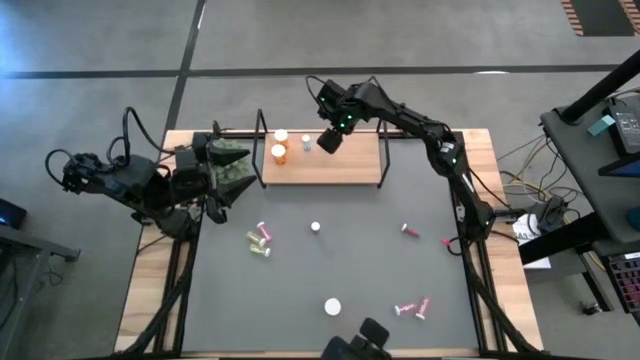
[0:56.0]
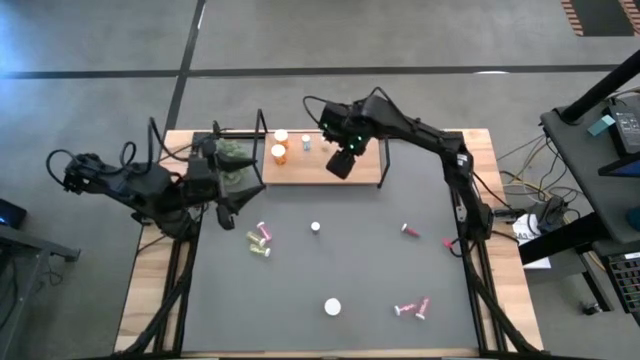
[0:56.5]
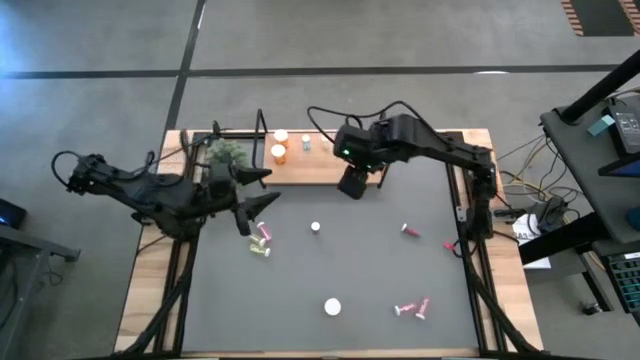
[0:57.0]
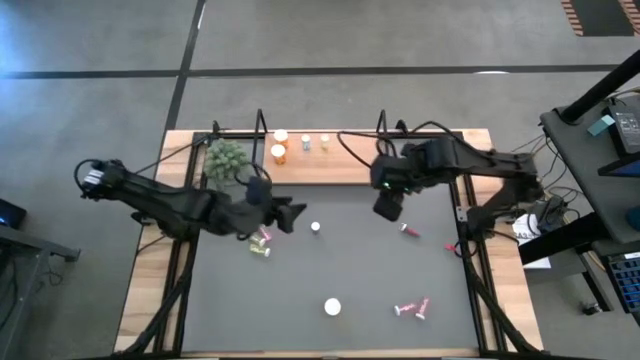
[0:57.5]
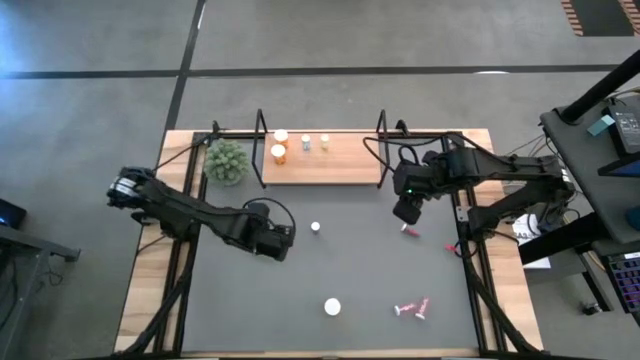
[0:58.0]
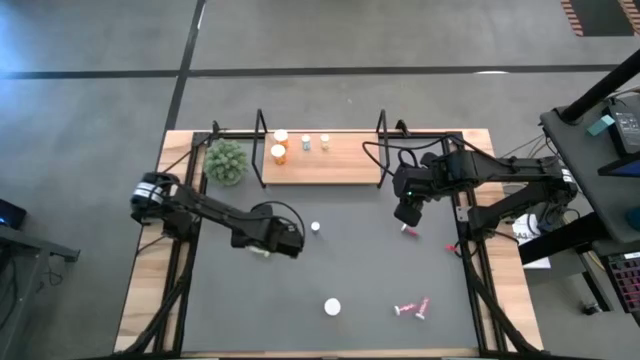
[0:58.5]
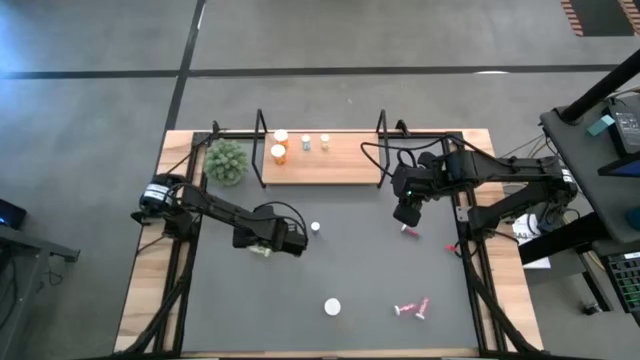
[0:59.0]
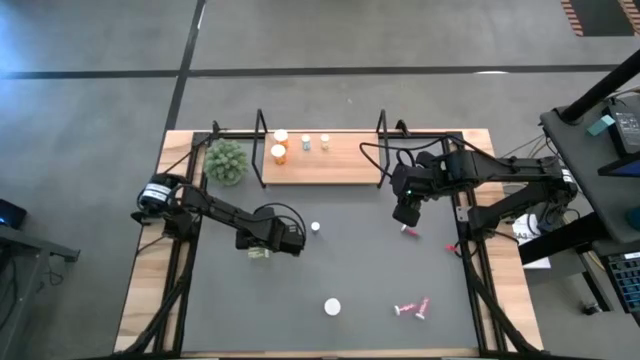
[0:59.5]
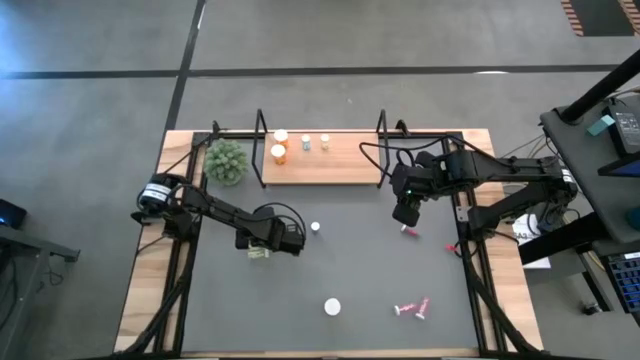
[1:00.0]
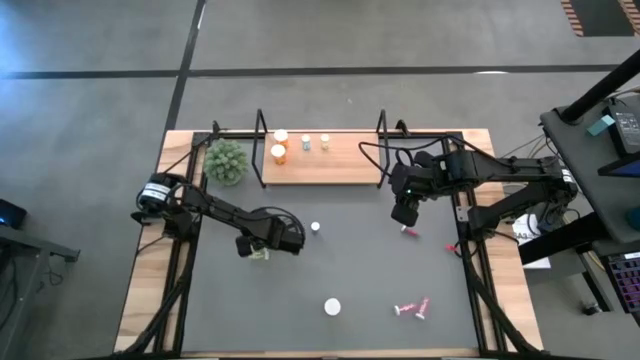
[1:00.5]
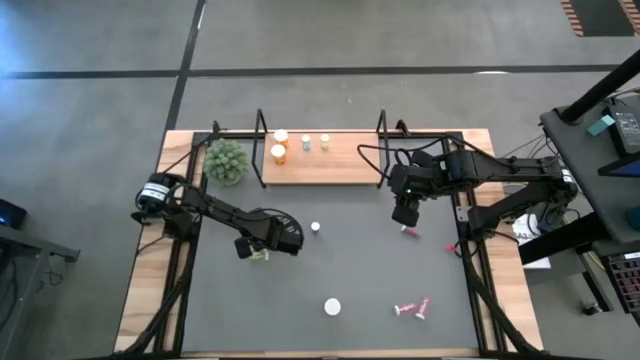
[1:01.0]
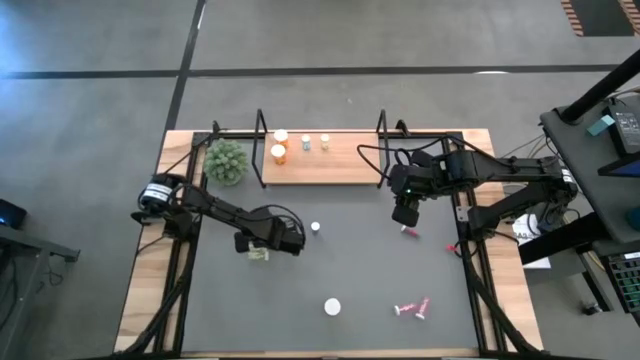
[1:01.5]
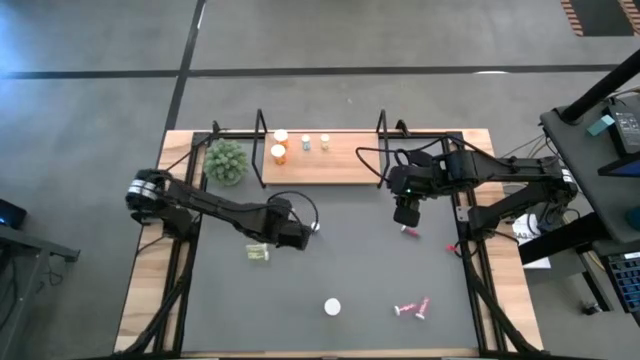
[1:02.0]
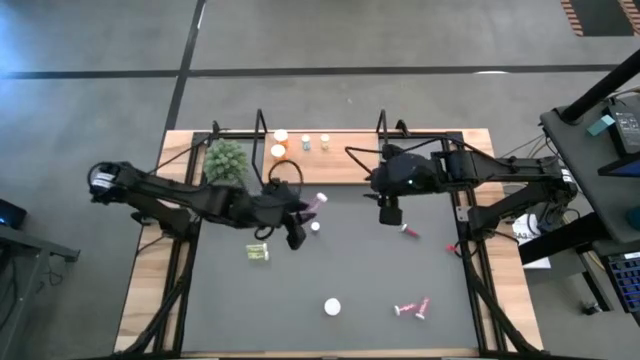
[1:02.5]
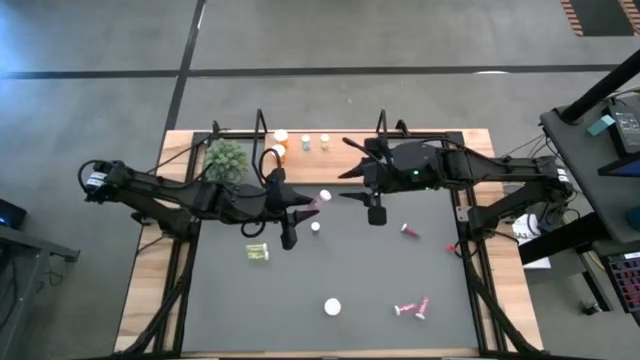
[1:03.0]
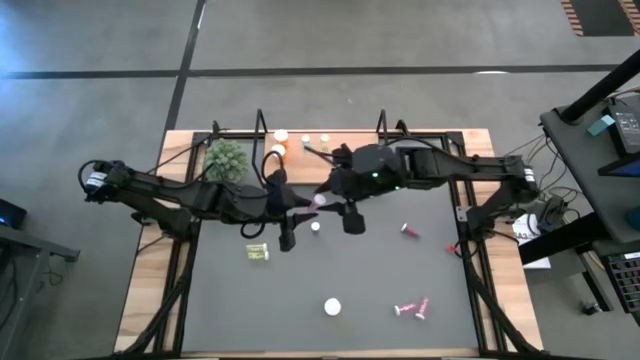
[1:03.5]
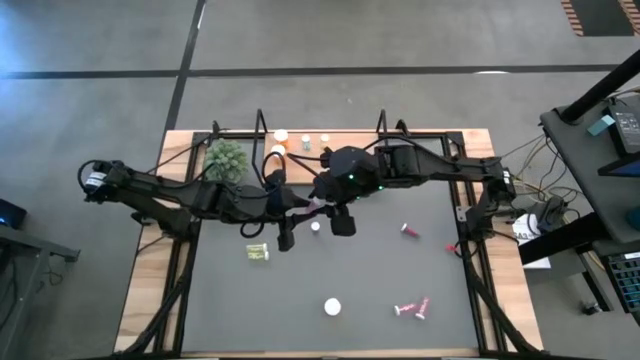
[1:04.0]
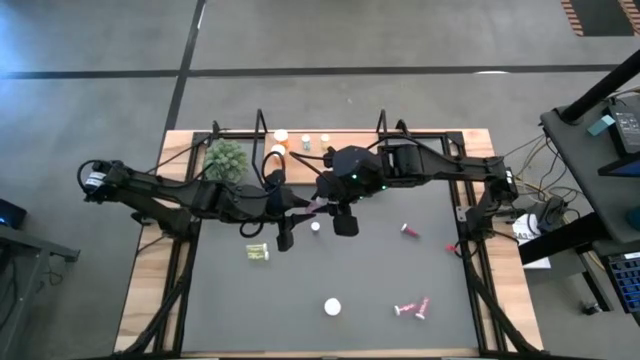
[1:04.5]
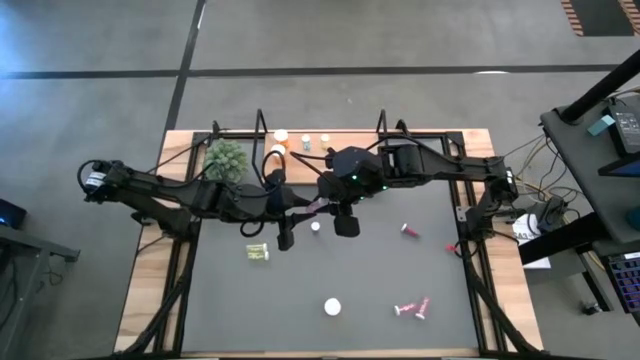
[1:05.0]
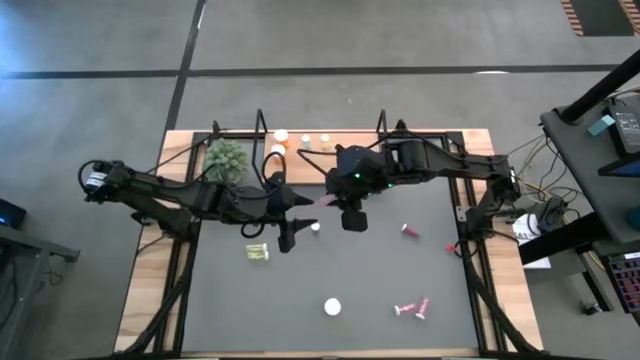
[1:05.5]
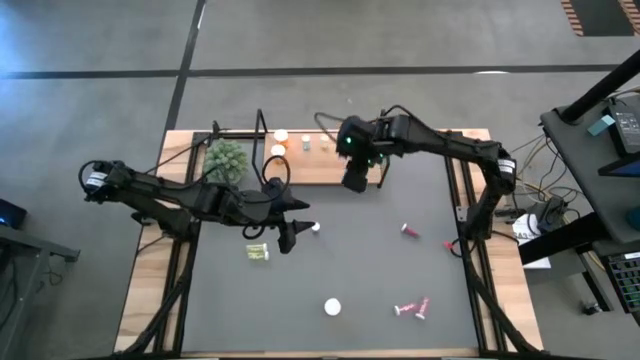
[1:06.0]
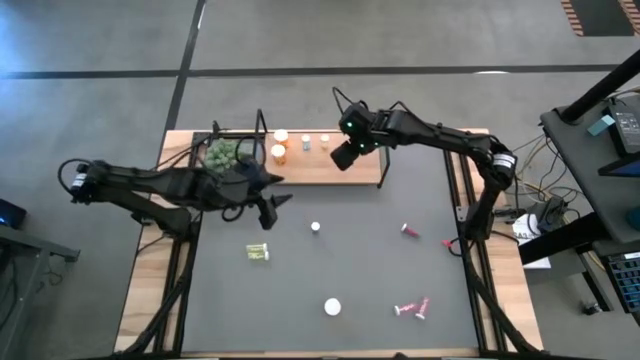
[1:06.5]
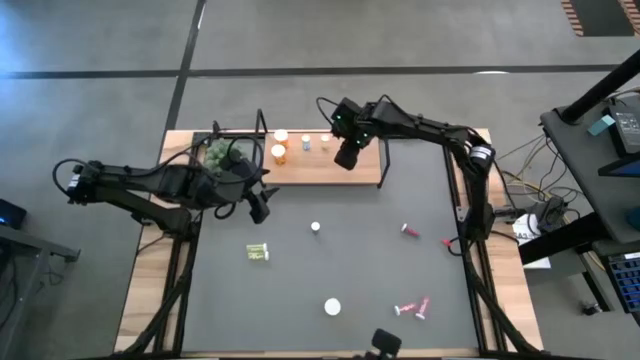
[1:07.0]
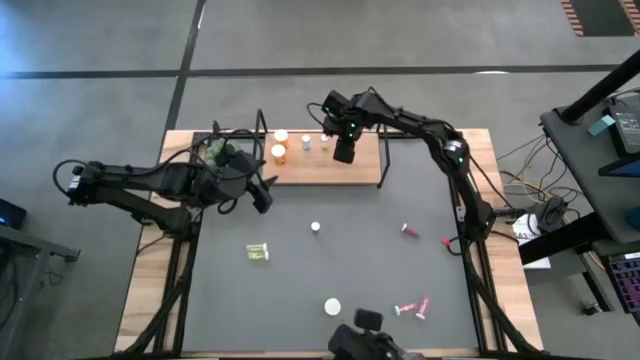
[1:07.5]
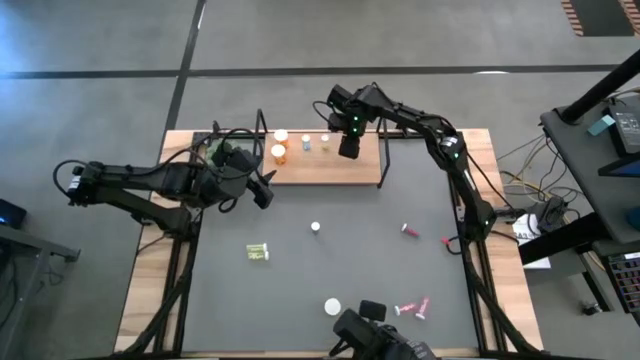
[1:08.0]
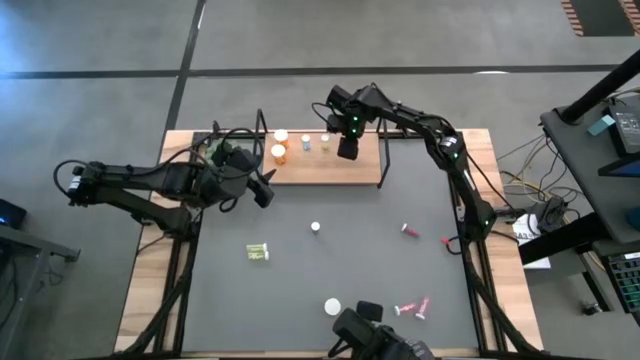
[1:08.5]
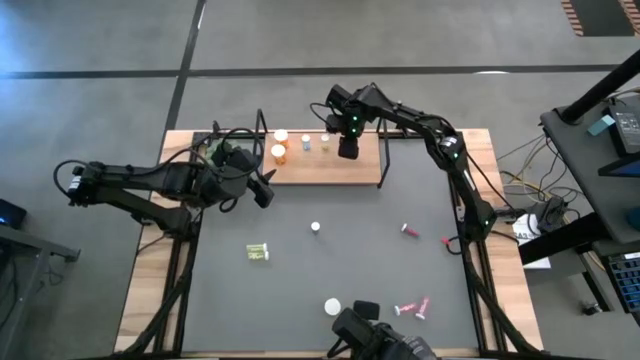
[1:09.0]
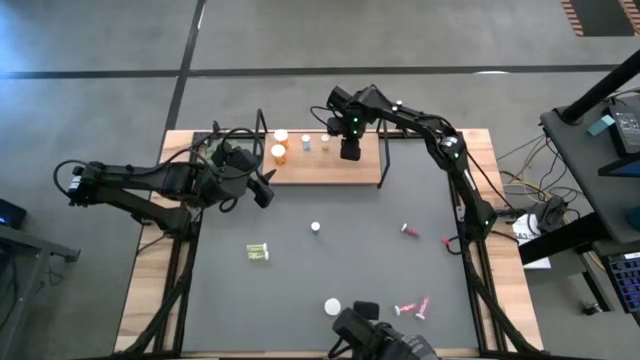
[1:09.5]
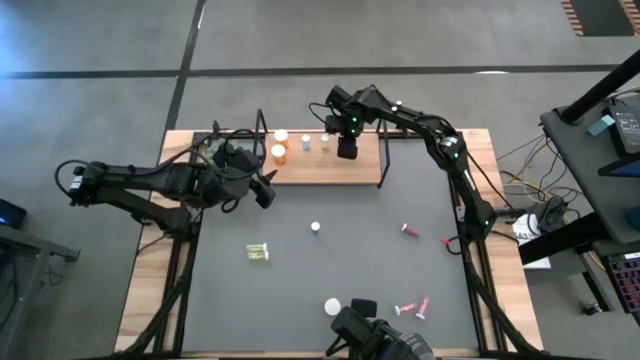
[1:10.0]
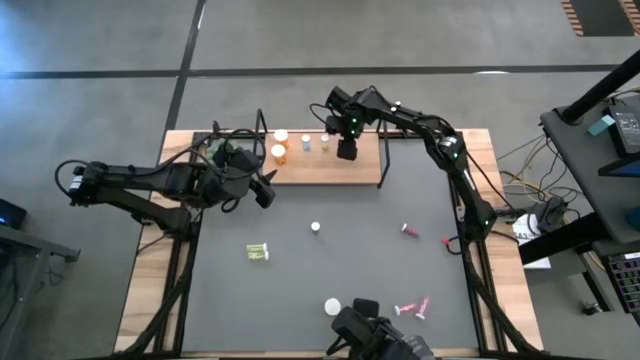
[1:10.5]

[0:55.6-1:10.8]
Task: Pick and place medicine bottles onto shelf by color
Put the top pink pill bottle on the shelf

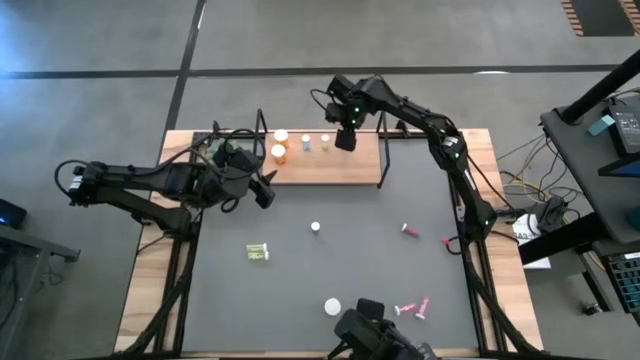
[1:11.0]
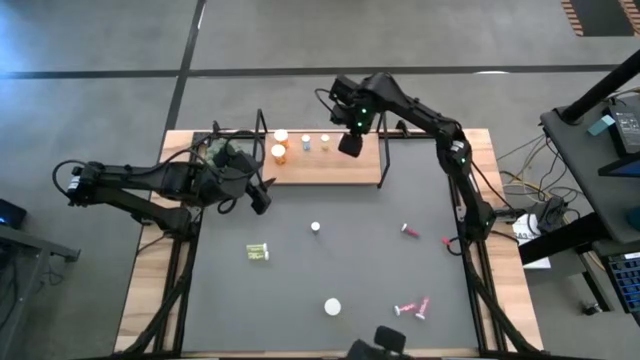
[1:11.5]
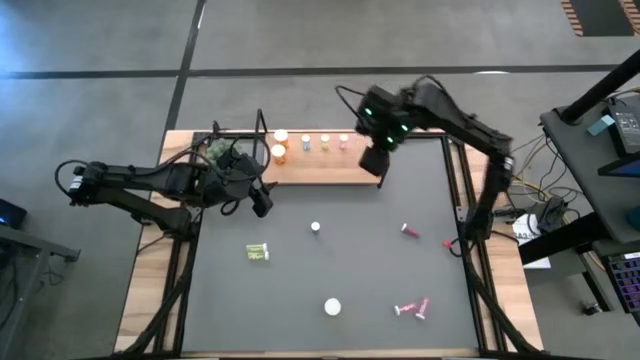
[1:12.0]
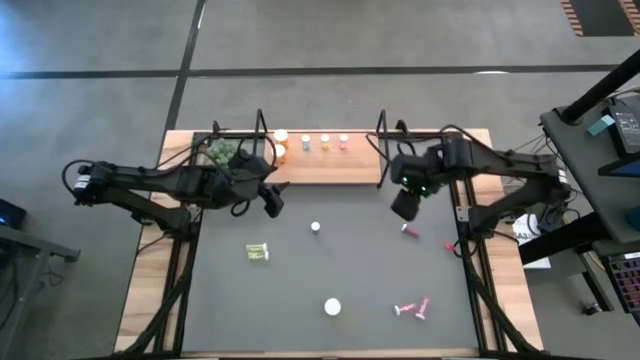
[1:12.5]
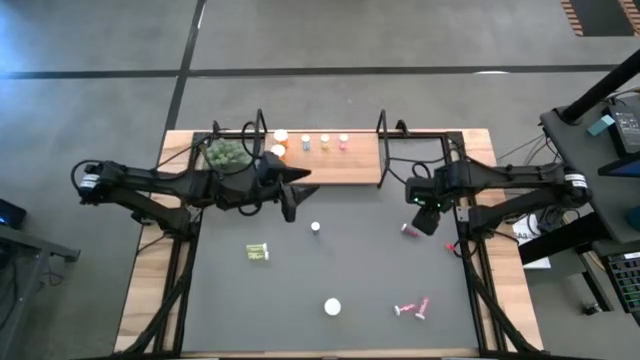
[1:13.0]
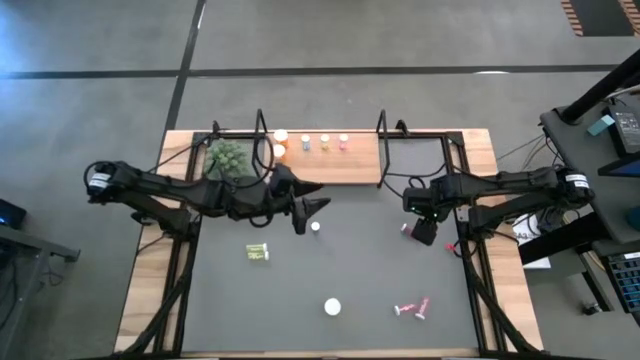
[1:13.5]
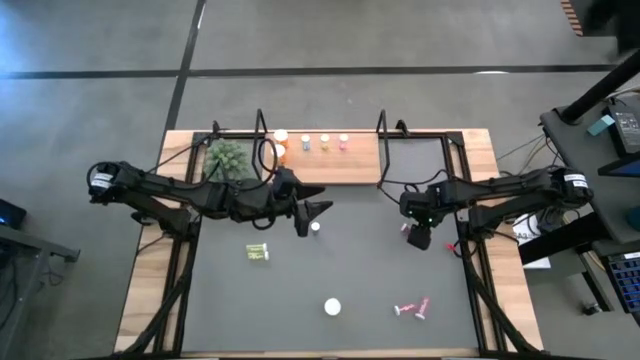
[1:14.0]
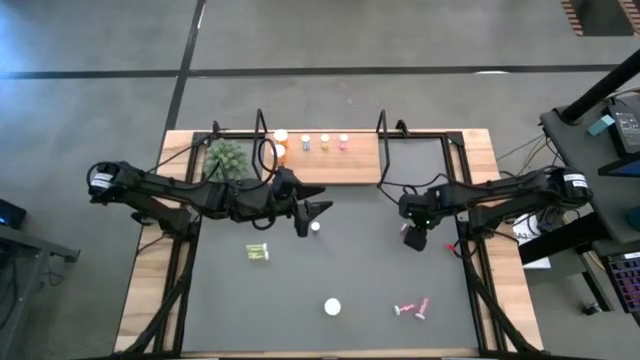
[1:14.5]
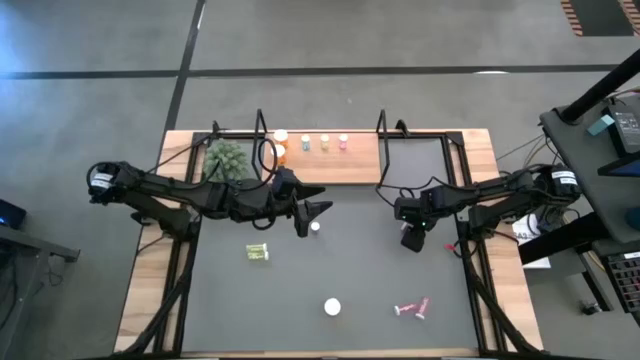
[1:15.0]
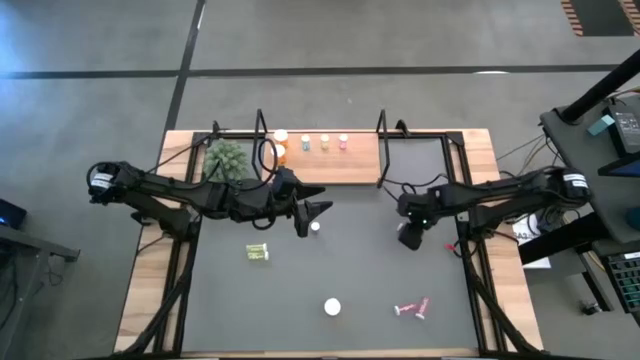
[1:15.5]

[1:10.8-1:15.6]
Put the right blue pill bottle on the shelf aligned with the other blue pill bottle

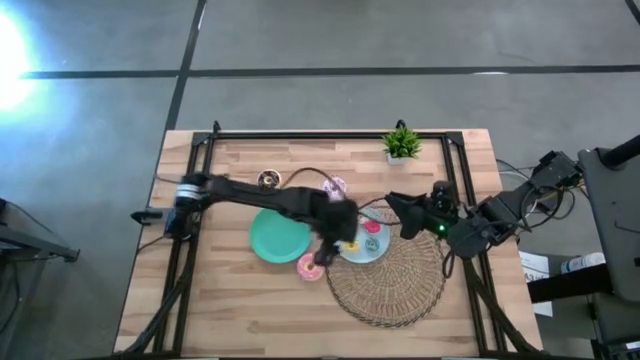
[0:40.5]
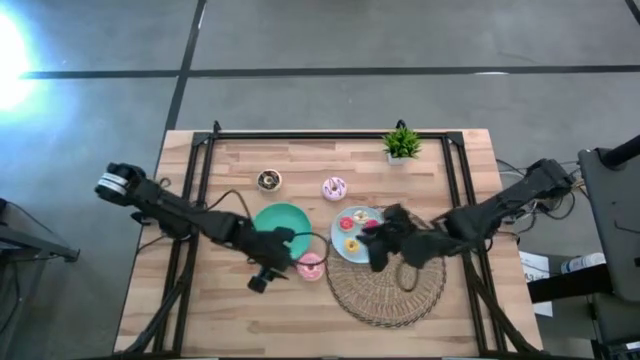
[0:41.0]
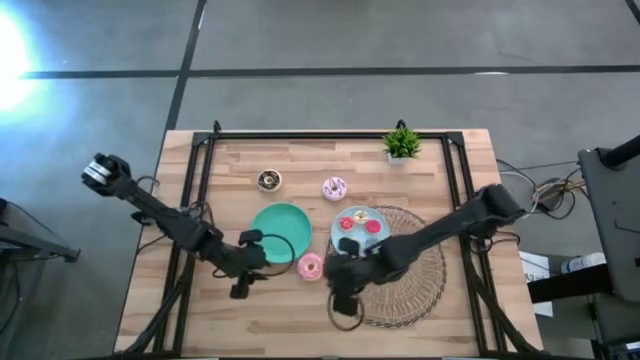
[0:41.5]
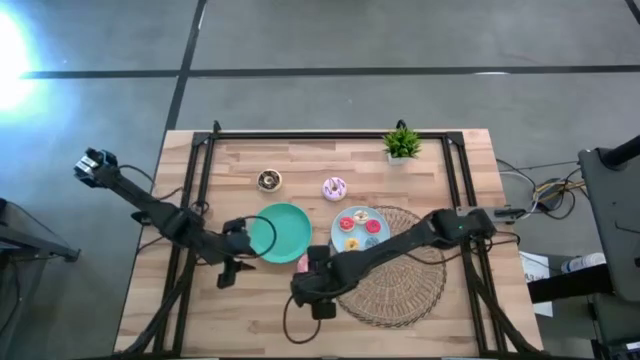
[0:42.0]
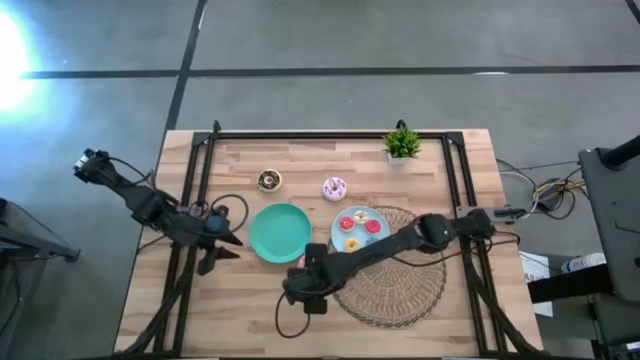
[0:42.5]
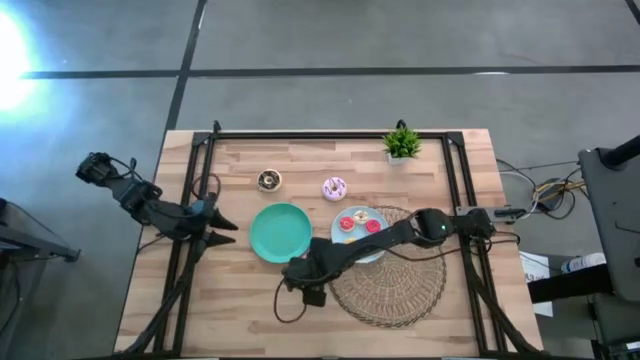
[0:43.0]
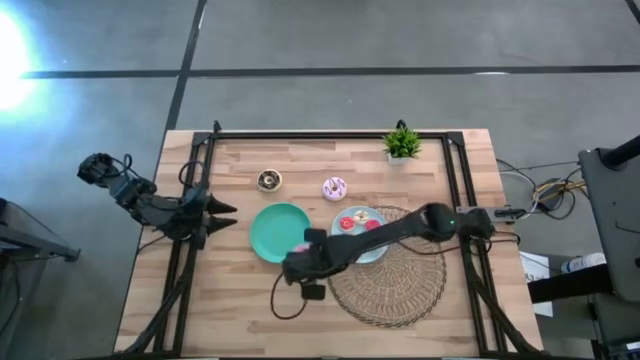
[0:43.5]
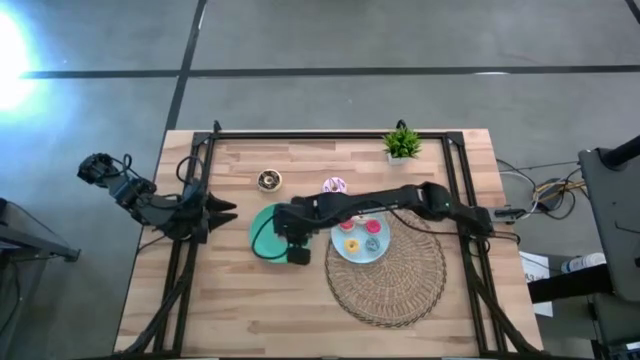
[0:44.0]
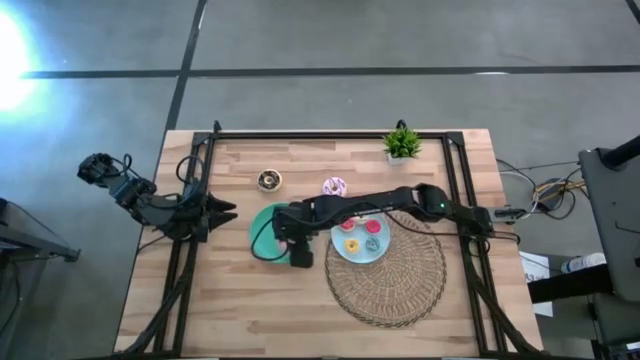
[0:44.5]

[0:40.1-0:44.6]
Task: Pick & Place donuts
Put the large pink donut on the green plate
